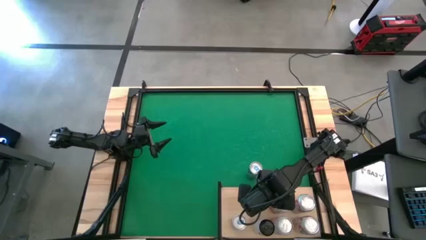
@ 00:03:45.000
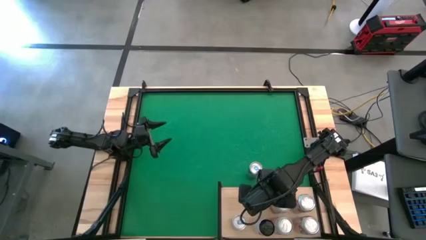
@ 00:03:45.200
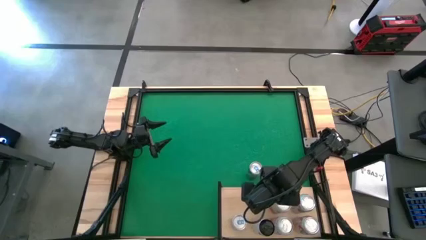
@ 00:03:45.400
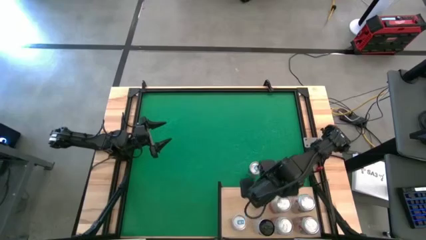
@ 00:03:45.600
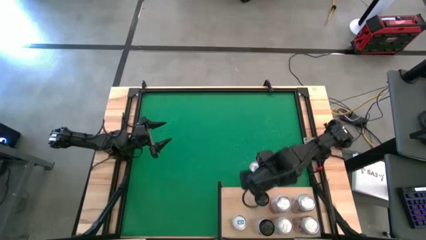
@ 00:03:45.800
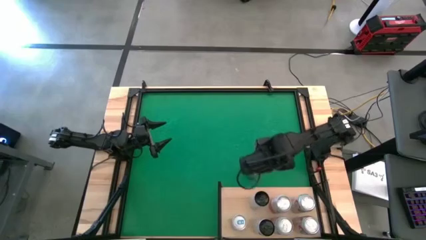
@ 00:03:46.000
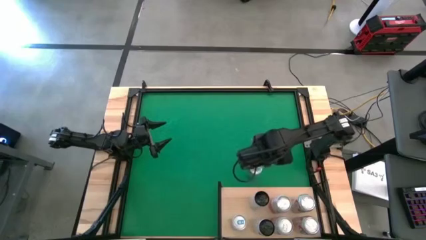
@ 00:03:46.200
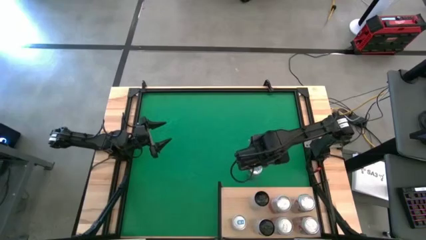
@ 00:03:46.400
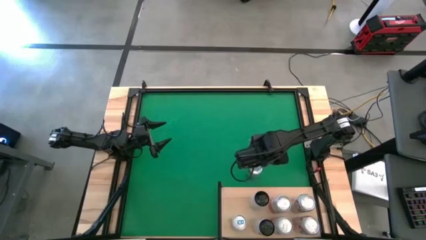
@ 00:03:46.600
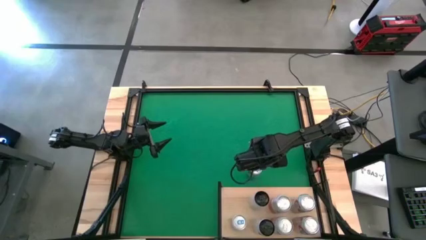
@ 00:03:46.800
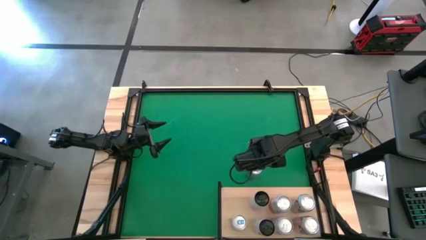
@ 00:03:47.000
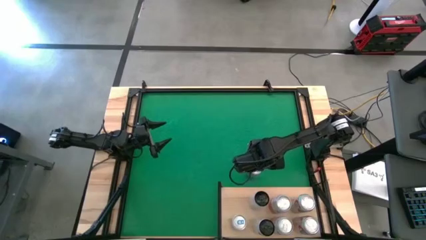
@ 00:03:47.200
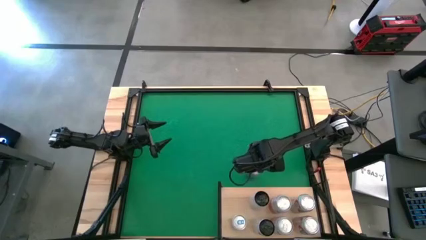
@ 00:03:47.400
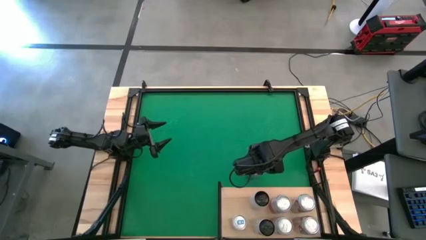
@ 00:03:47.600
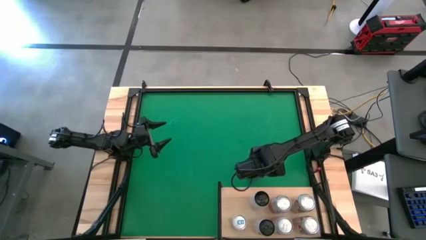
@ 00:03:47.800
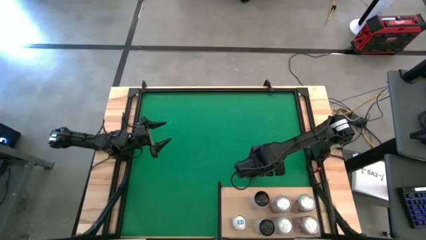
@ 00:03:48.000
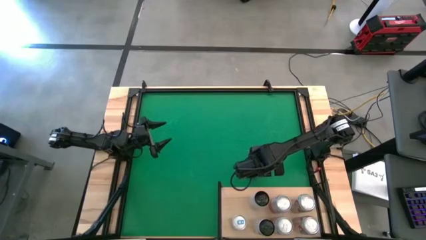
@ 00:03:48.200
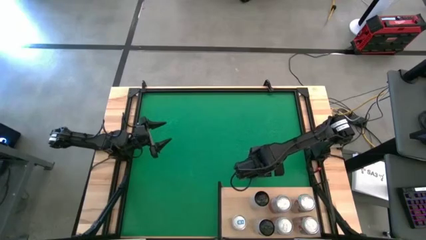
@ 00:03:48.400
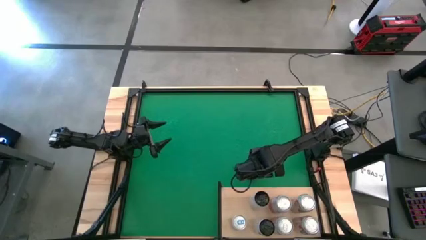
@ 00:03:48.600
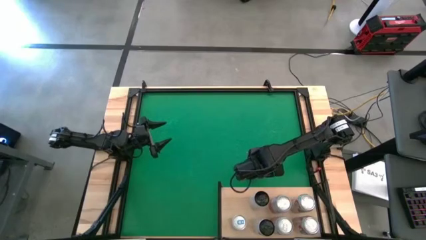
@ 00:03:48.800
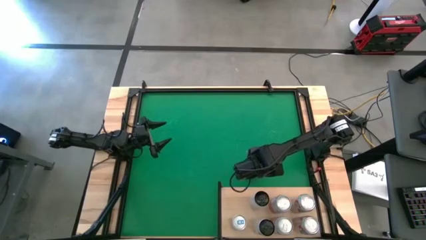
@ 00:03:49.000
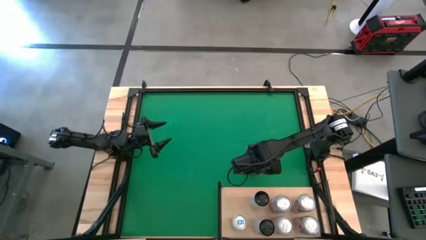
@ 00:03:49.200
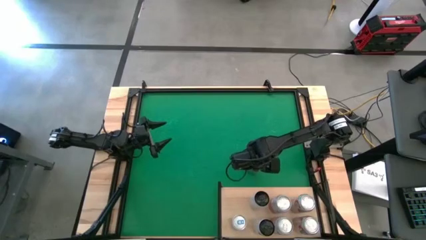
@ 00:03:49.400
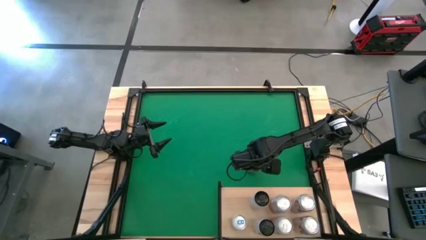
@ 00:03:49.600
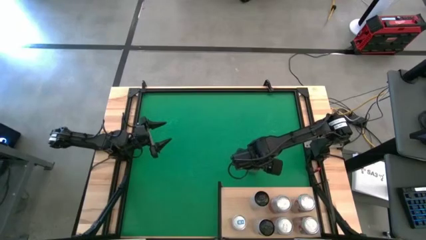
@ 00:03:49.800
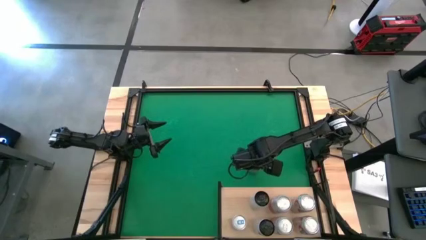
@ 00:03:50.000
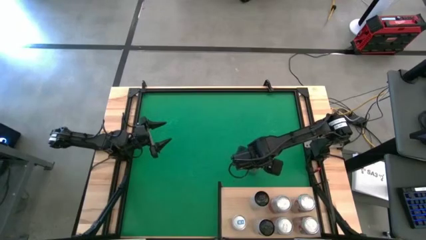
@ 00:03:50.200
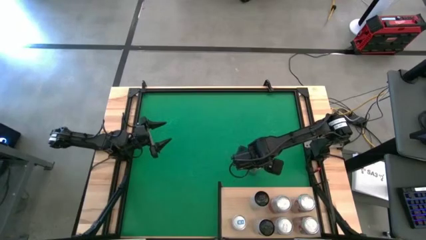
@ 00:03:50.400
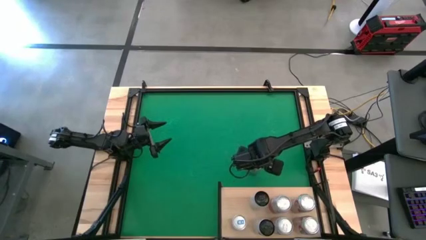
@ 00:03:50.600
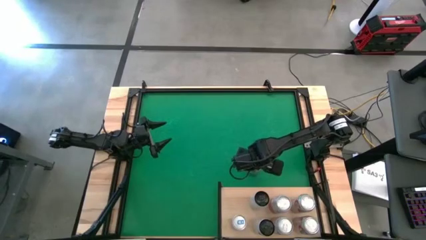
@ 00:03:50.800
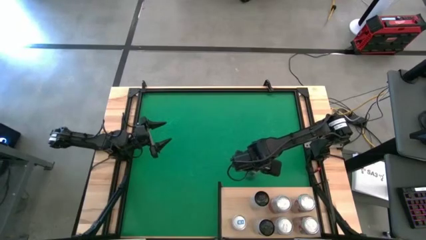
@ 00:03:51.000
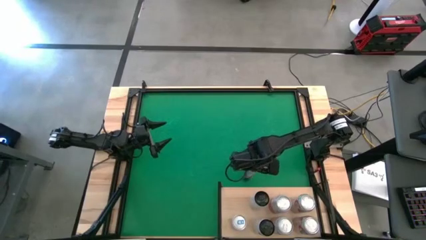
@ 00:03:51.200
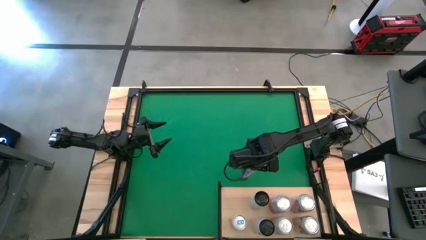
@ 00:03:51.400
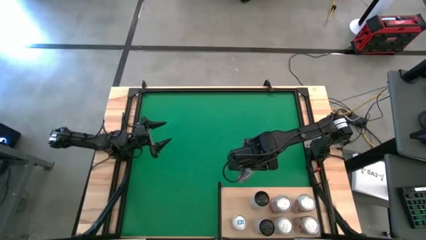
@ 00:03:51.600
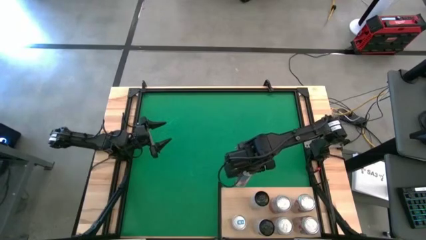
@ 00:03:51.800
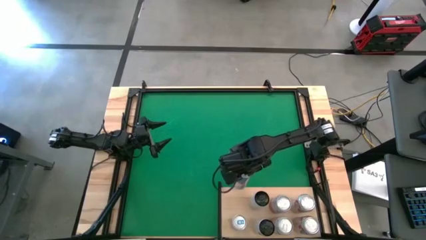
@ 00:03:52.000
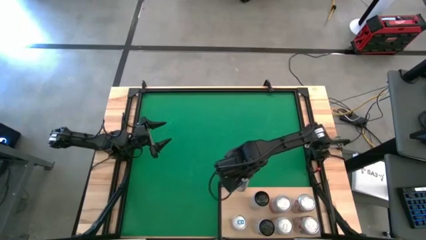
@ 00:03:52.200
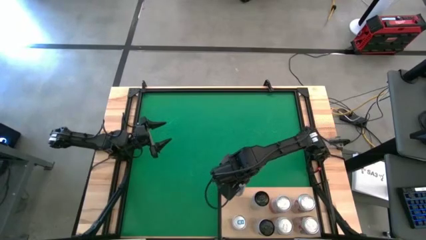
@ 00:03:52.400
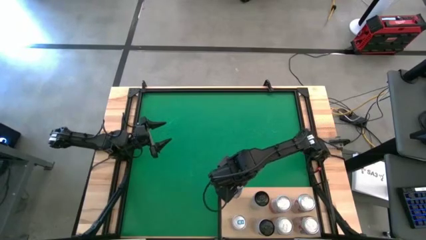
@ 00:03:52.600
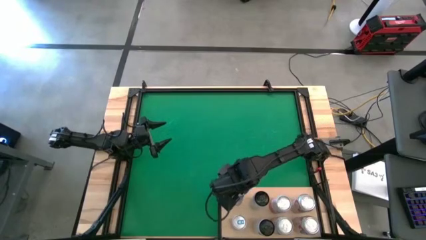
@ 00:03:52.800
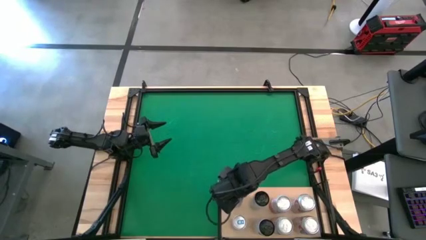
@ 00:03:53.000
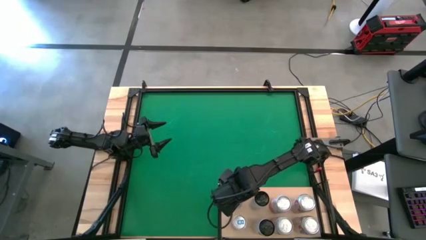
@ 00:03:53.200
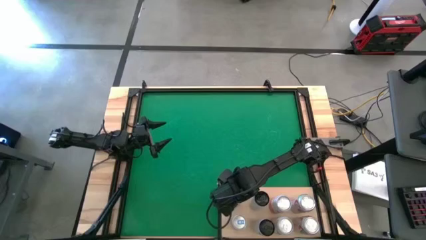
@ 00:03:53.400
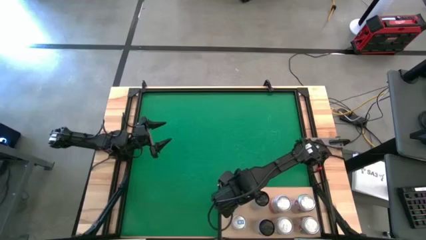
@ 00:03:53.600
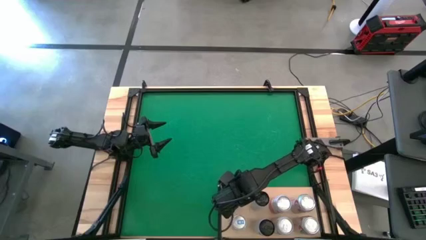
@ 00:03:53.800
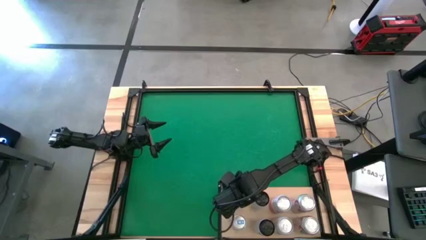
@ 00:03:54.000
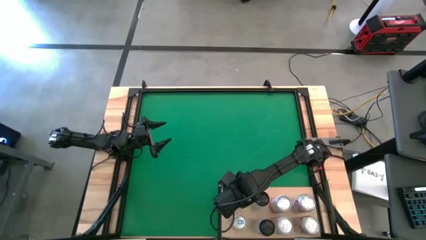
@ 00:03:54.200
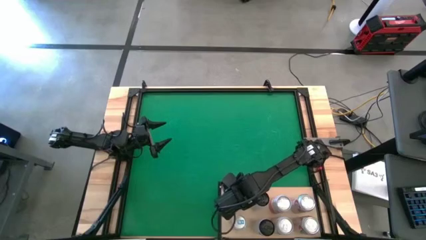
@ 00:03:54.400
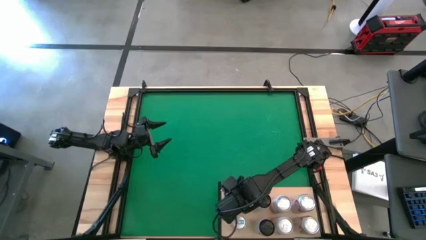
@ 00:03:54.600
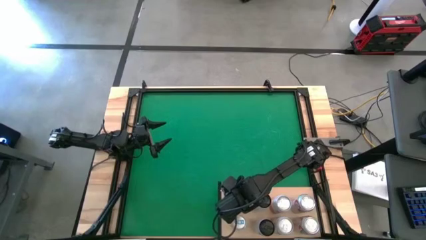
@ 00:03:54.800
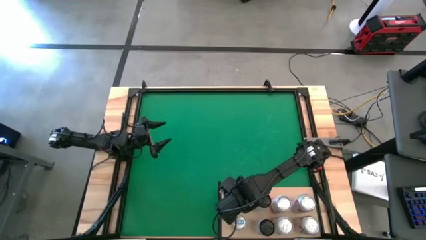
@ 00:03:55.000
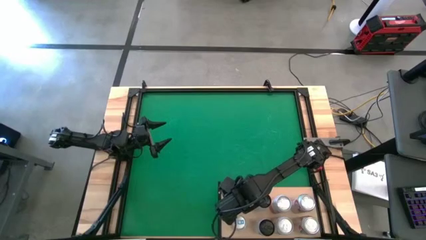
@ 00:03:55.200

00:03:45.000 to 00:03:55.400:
Task: Place canned beverage on shelf
Put the blue soda can aligned with the blue soda can on the shelf

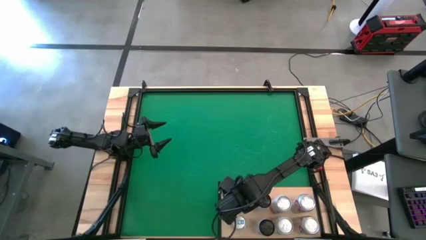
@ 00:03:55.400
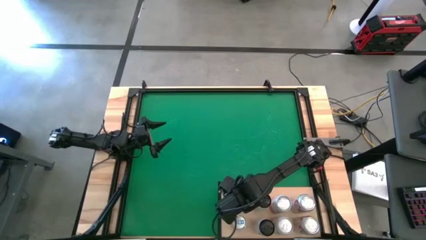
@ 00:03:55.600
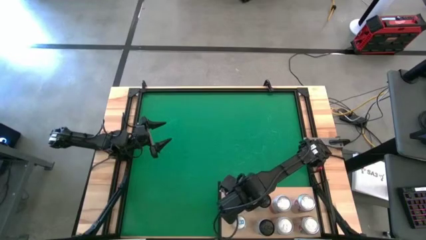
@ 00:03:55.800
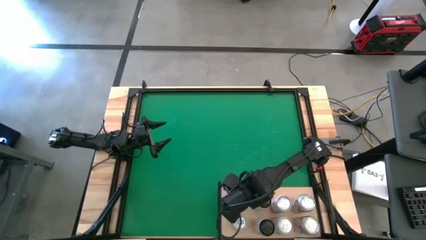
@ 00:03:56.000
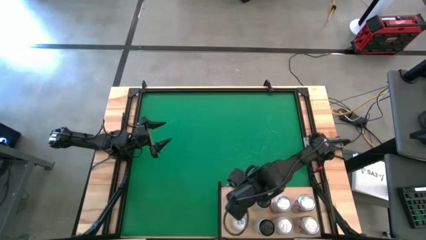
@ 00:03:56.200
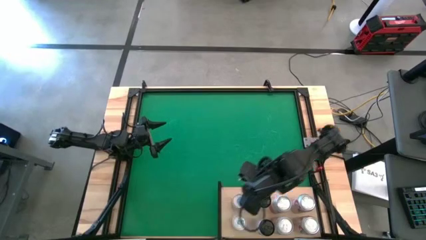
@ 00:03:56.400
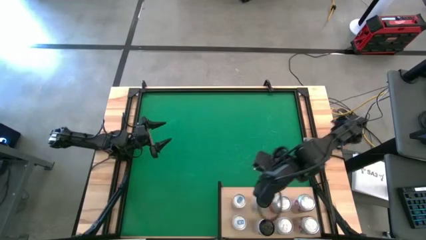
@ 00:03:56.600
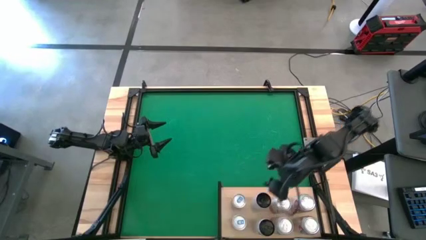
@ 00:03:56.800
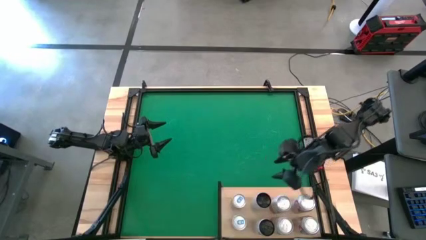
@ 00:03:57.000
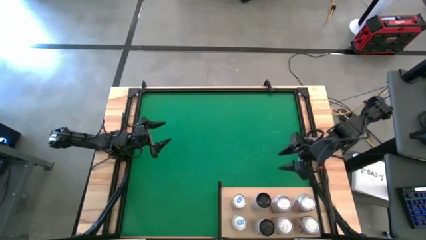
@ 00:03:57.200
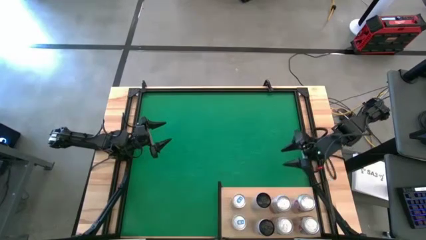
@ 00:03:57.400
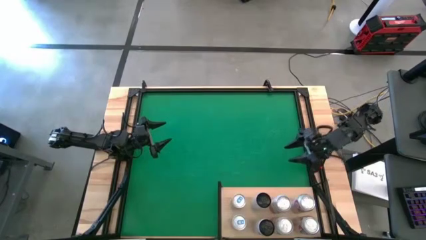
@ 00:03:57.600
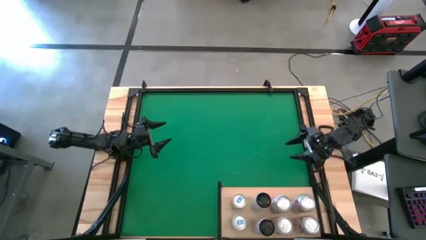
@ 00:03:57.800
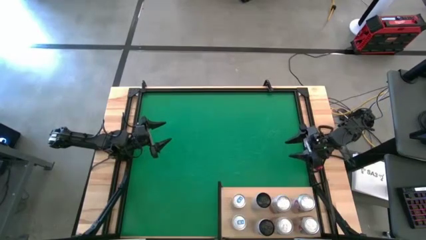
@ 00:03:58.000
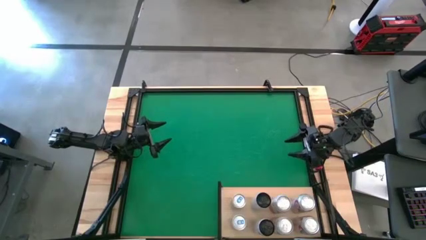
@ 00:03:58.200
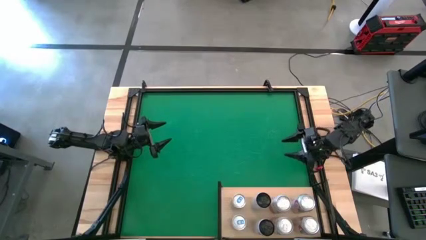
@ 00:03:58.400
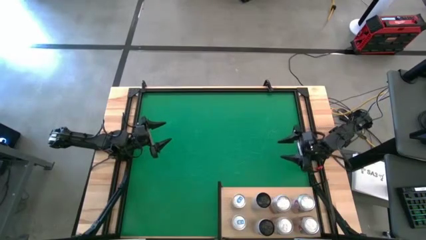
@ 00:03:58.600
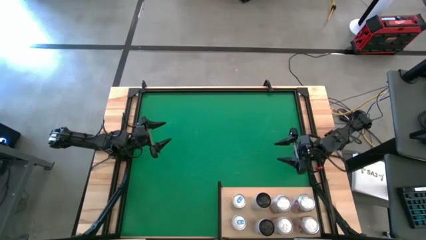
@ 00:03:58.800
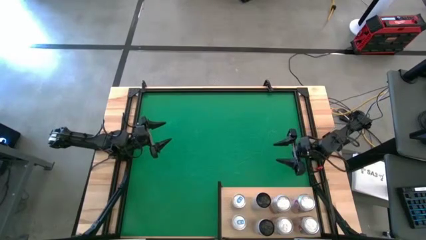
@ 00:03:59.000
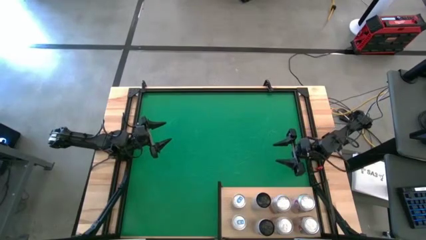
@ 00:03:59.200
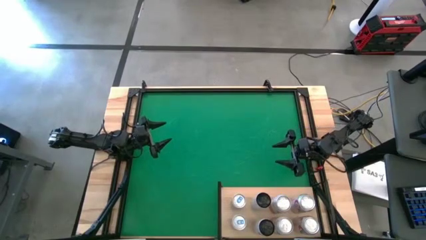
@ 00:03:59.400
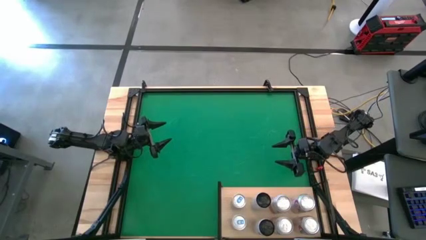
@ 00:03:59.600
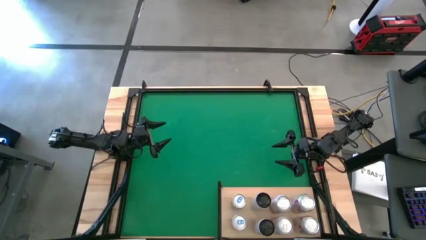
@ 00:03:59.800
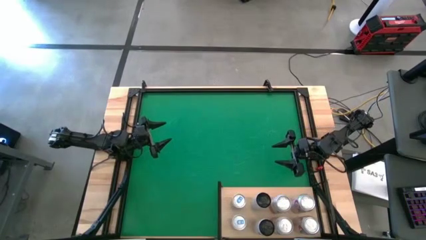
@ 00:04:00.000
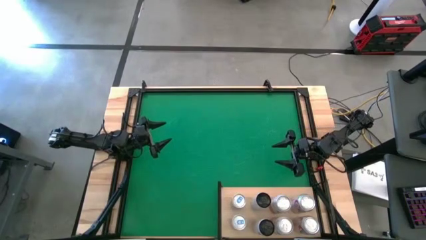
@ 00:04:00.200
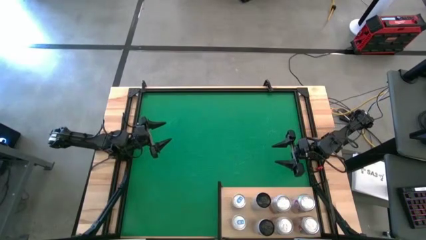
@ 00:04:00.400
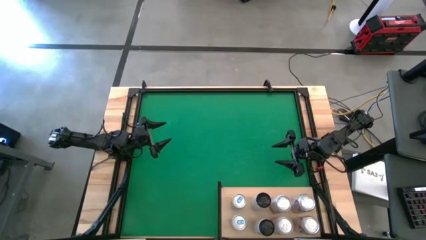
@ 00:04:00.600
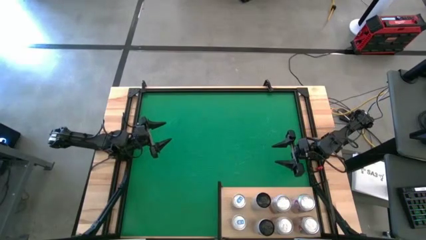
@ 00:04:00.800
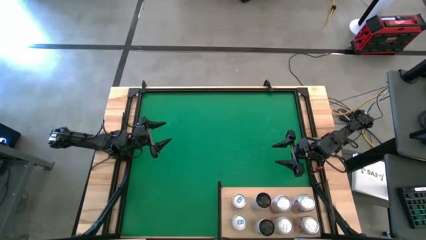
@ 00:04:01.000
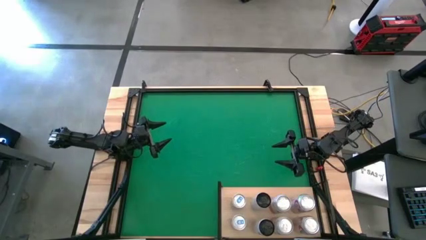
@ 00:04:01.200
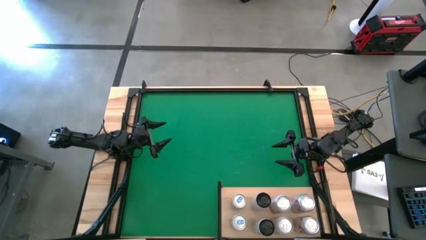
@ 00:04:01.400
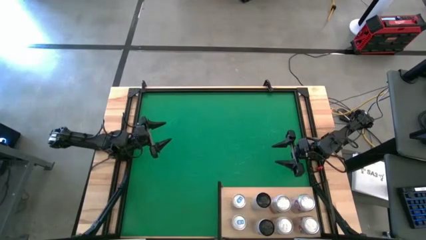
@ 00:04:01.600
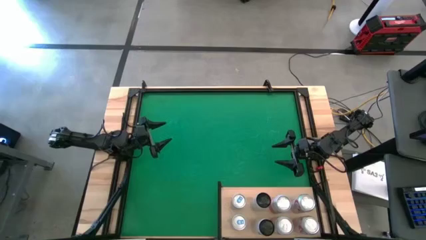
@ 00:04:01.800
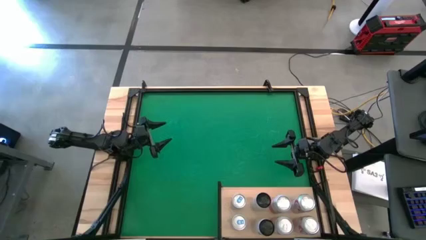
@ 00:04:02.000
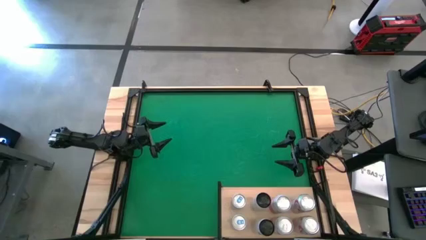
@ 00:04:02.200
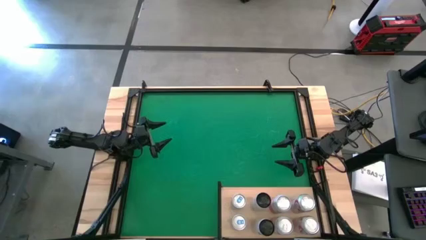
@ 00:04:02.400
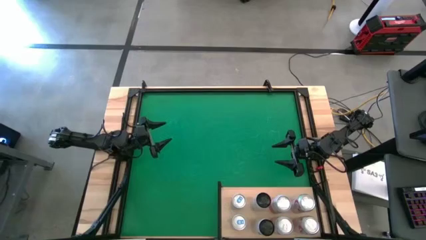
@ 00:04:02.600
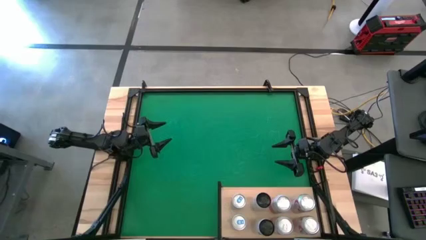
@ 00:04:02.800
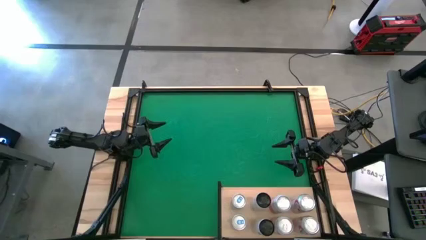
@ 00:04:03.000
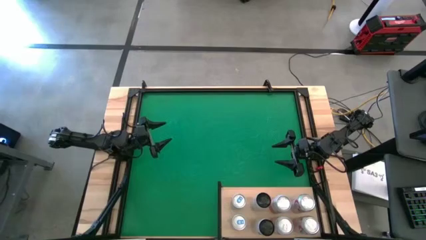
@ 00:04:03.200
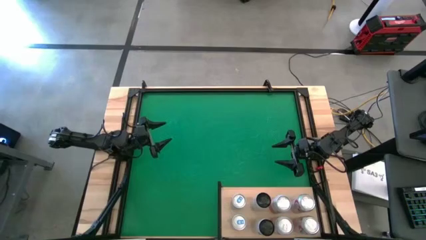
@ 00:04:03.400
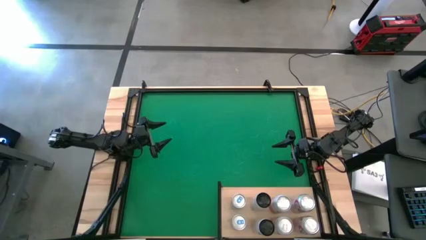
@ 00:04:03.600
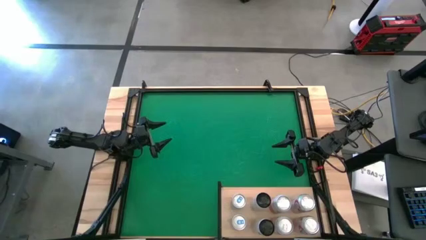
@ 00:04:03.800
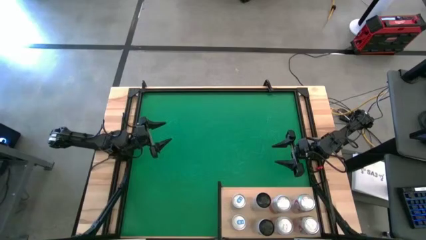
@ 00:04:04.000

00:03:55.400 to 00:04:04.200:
Return to Home Position
